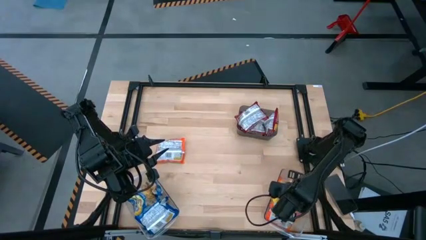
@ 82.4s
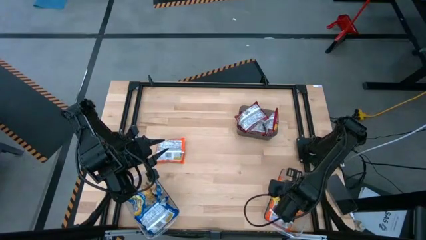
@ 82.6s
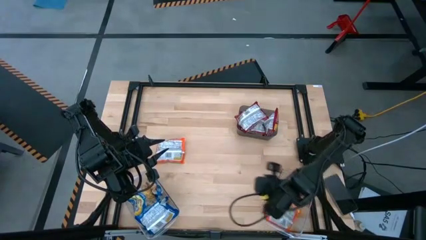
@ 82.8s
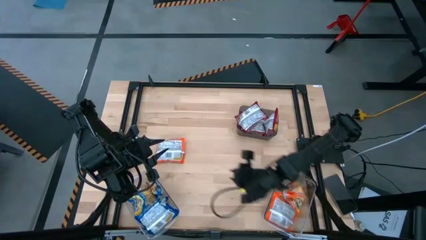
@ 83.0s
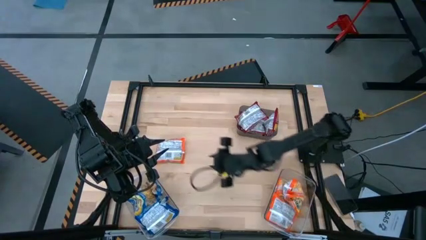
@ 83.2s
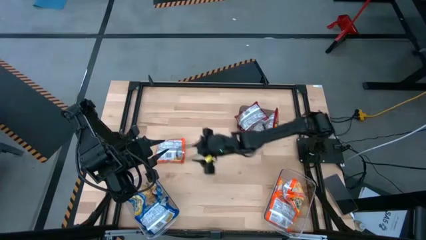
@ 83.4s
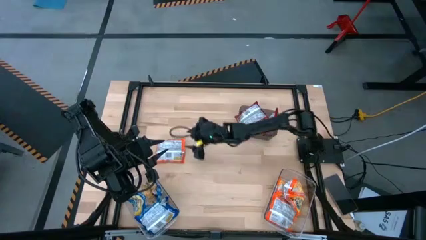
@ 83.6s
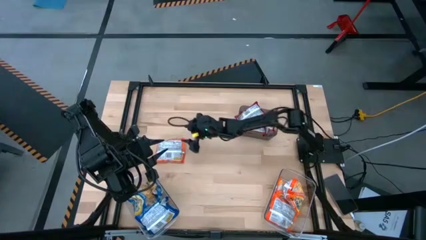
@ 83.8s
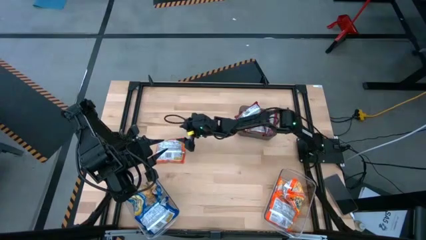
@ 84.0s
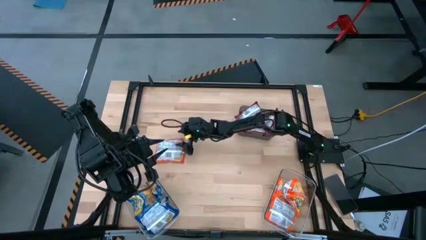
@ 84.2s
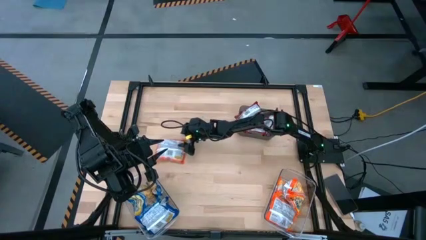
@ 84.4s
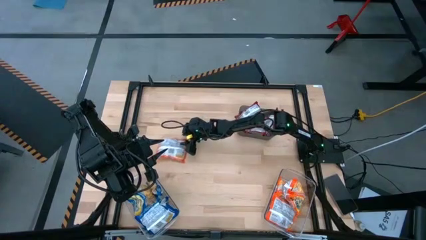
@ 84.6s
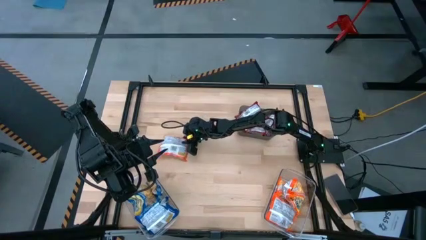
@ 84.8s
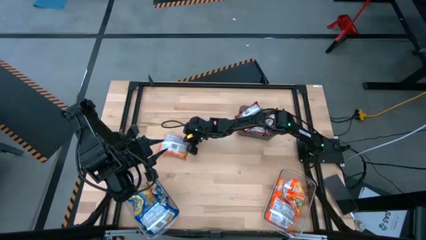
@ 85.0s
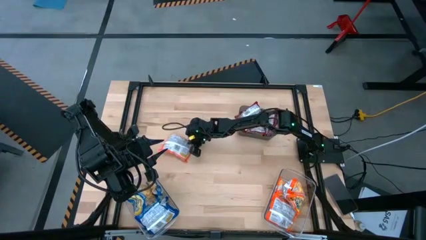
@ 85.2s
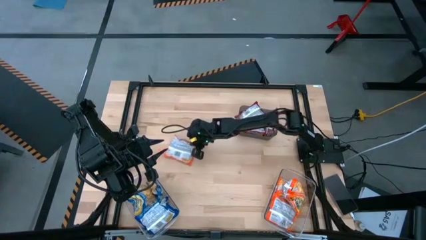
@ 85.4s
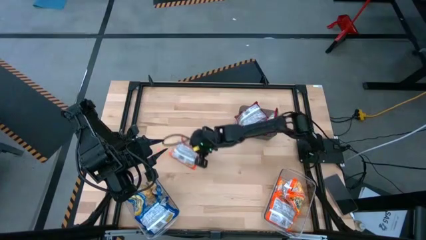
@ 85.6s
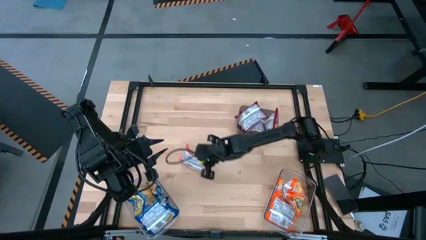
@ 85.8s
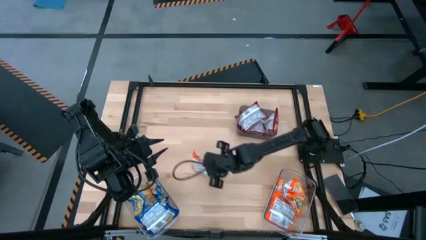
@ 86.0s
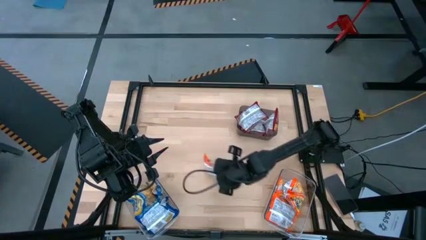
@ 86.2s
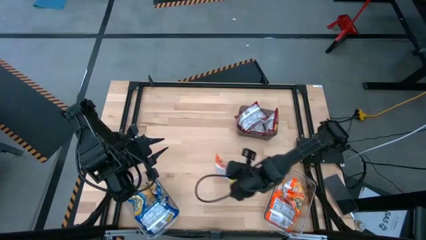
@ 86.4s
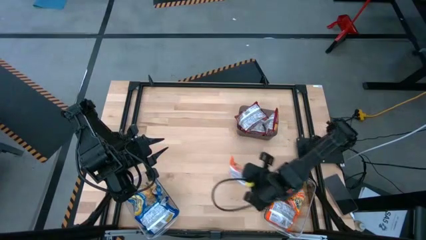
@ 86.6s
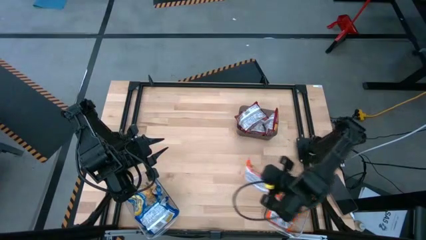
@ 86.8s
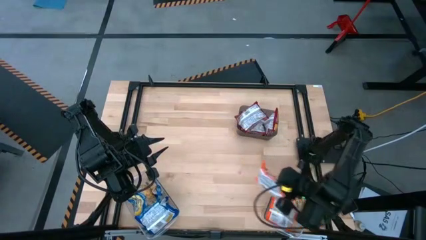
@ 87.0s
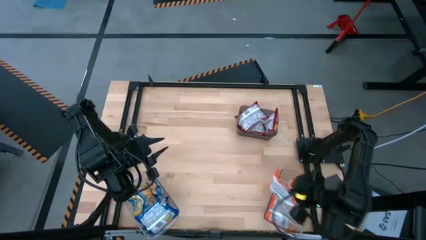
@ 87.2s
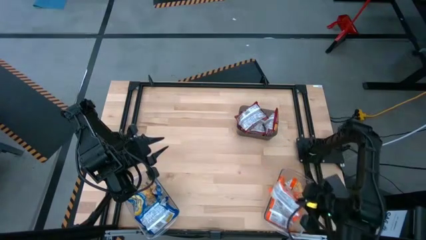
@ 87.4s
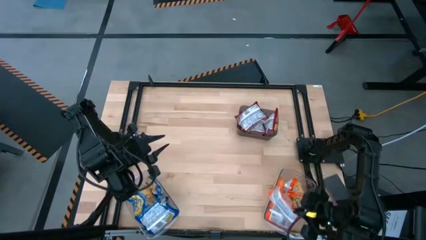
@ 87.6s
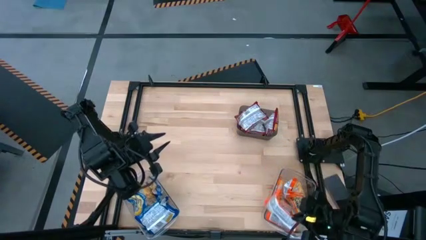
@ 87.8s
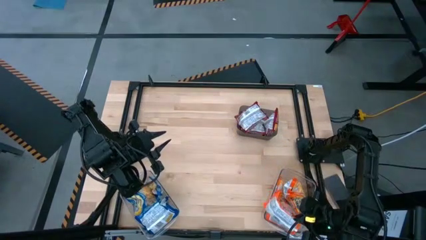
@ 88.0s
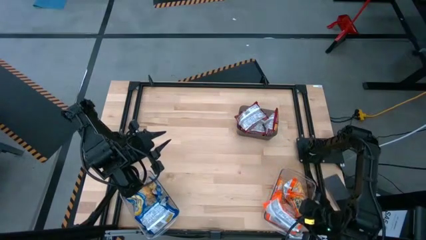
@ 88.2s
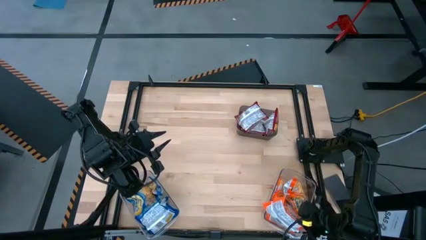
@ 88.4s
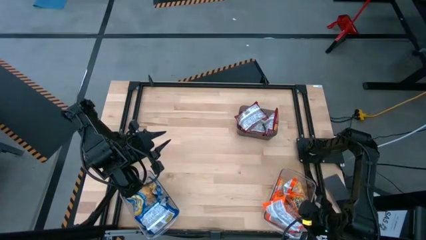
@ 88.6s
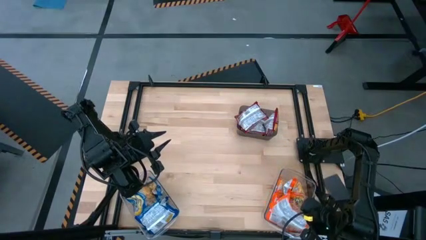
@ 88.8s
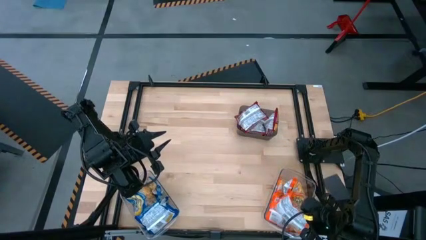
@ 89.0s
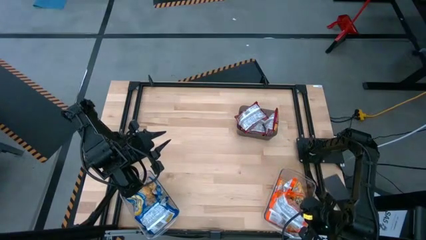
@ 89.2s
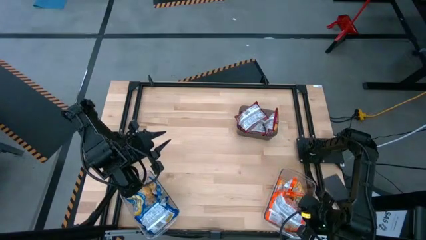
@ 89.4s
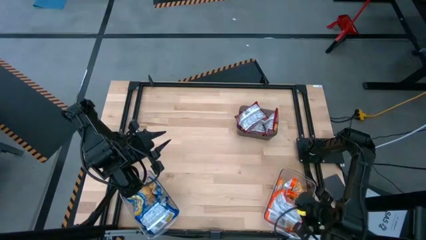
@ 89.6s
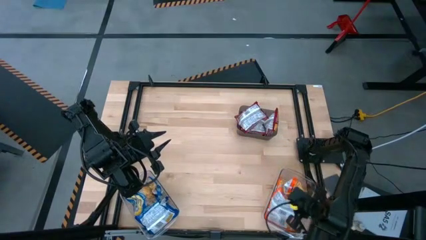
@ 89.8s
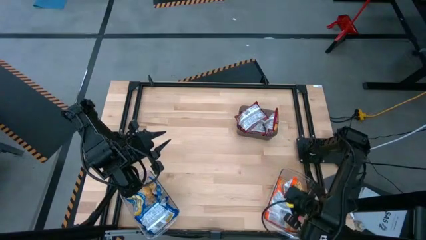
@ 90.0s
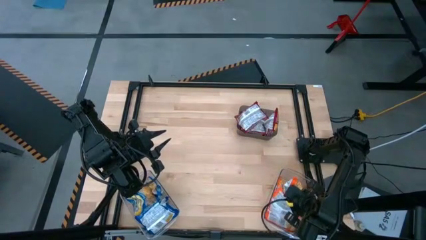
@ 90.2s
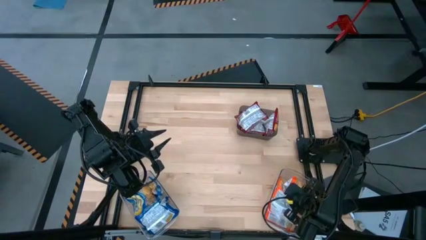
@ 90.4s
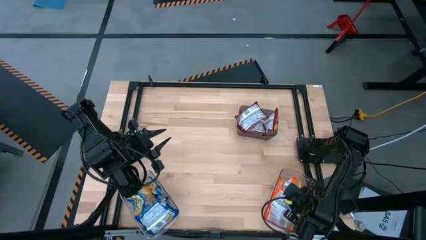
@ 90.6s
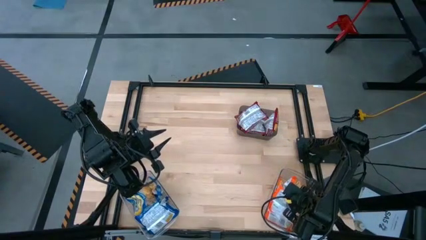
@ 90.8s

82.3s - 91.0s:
Task: Sort Maruchan noodles
Put the orange noodle pack into the right transparent bin

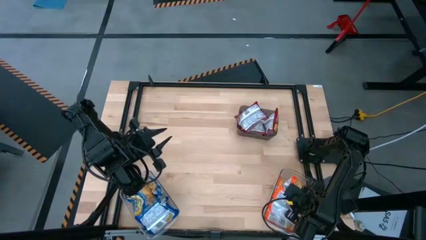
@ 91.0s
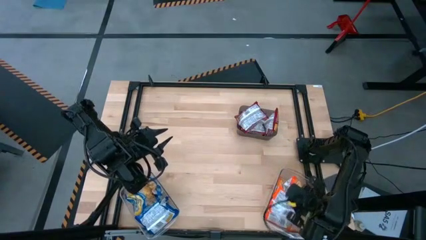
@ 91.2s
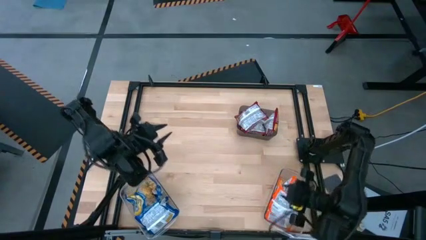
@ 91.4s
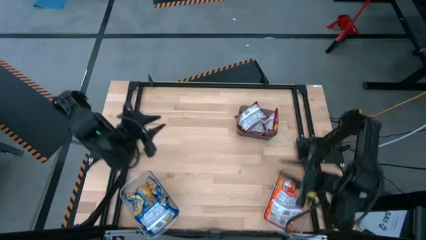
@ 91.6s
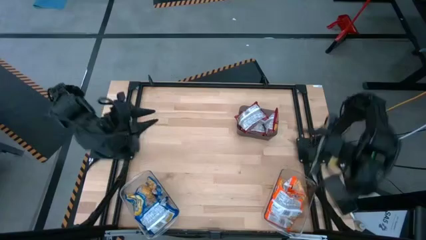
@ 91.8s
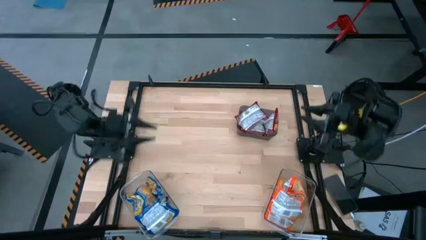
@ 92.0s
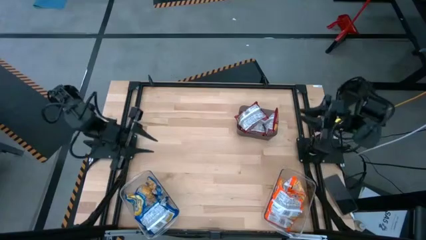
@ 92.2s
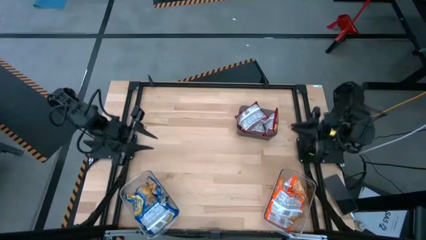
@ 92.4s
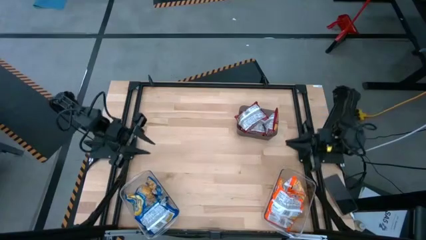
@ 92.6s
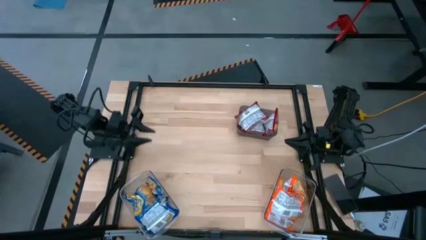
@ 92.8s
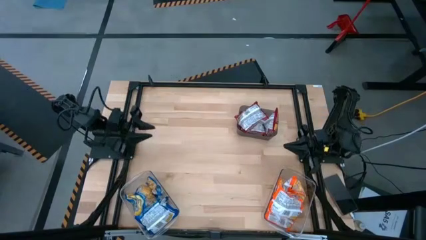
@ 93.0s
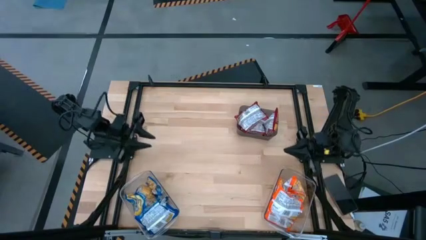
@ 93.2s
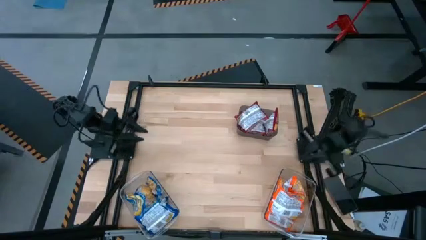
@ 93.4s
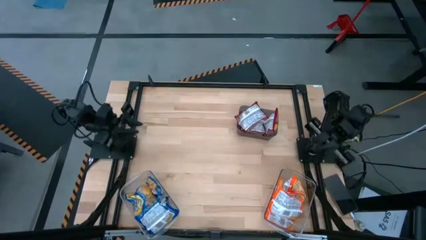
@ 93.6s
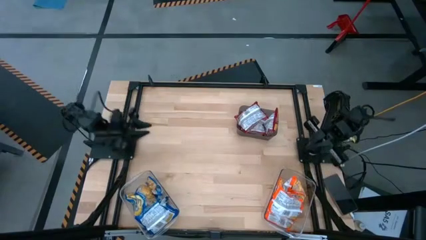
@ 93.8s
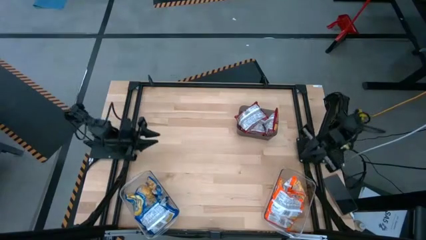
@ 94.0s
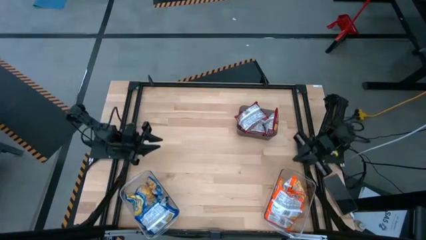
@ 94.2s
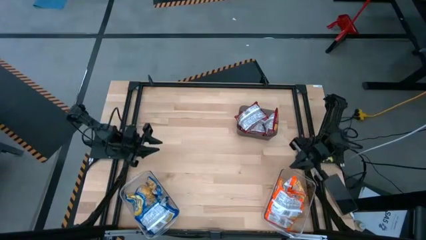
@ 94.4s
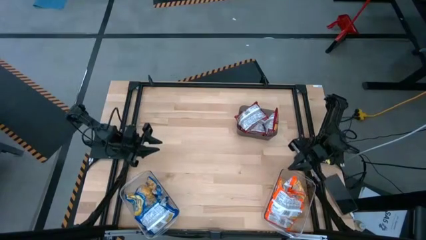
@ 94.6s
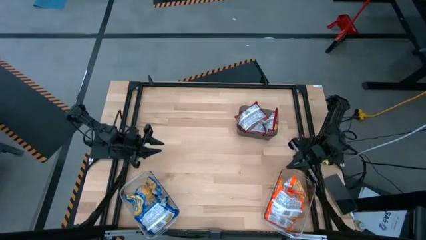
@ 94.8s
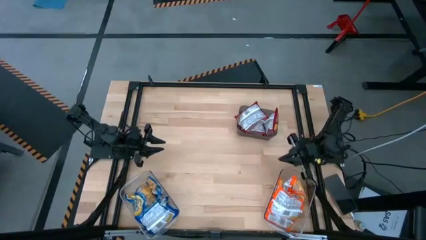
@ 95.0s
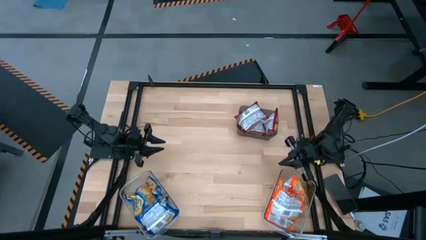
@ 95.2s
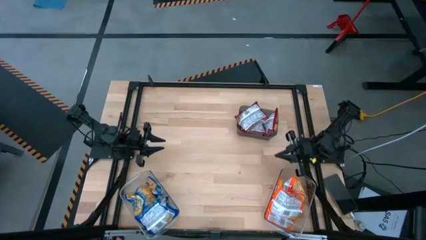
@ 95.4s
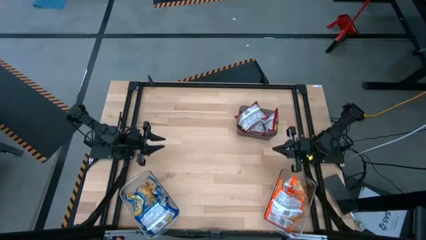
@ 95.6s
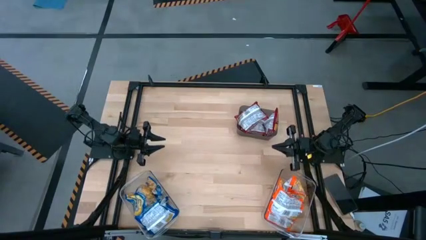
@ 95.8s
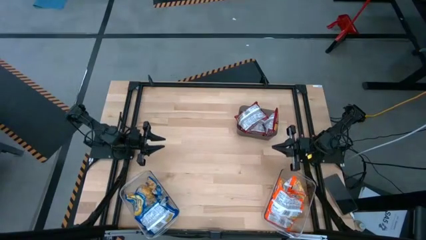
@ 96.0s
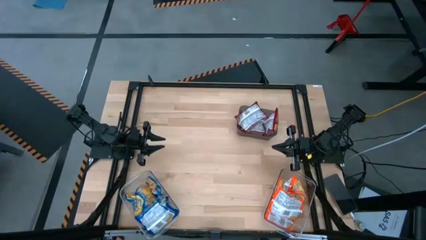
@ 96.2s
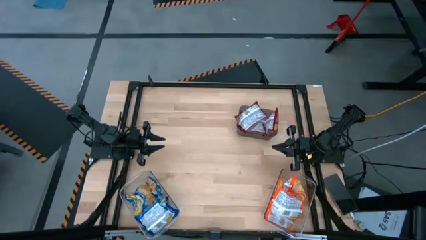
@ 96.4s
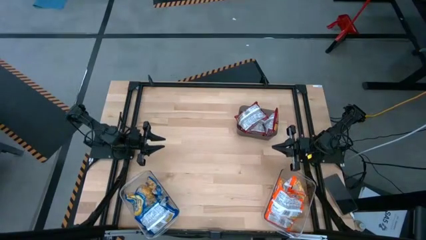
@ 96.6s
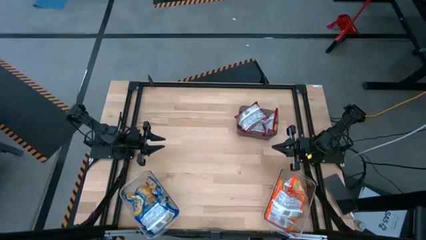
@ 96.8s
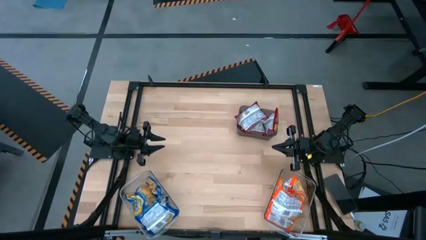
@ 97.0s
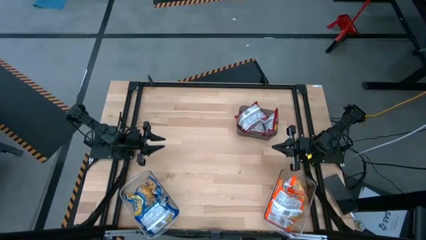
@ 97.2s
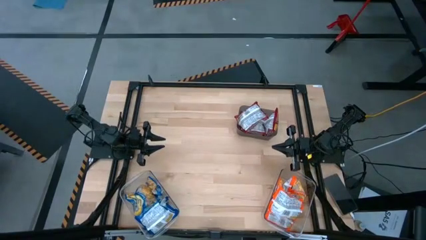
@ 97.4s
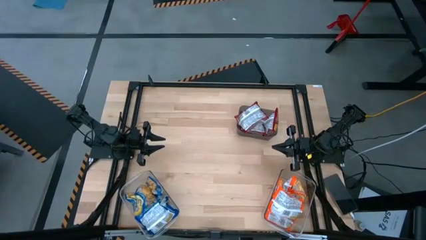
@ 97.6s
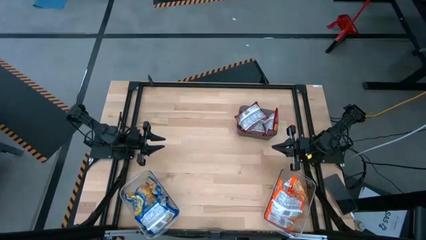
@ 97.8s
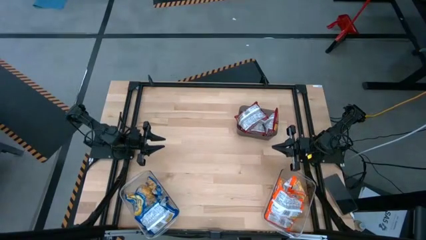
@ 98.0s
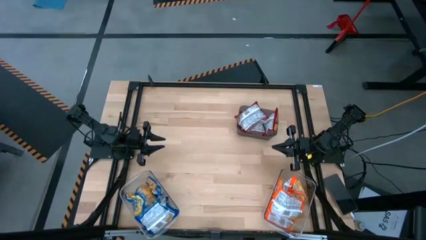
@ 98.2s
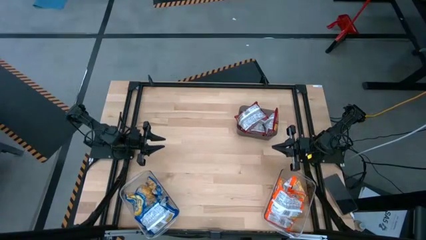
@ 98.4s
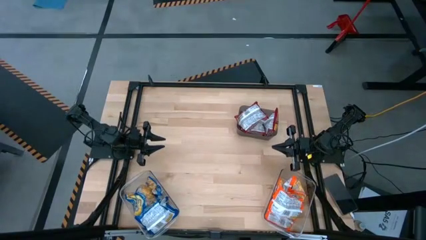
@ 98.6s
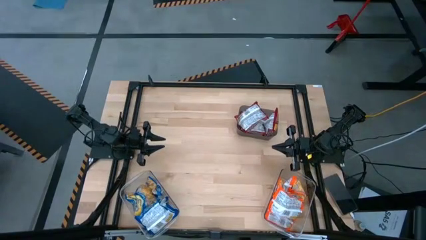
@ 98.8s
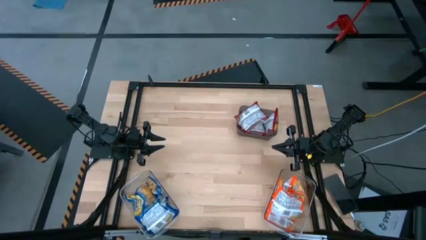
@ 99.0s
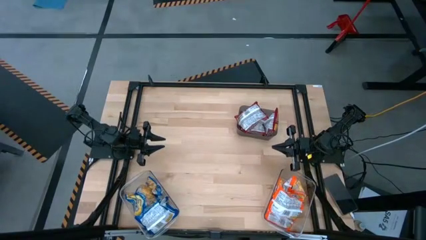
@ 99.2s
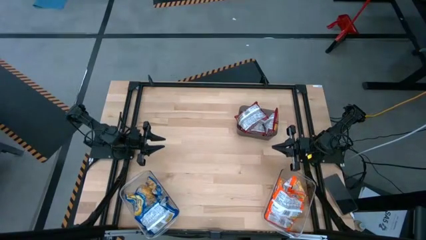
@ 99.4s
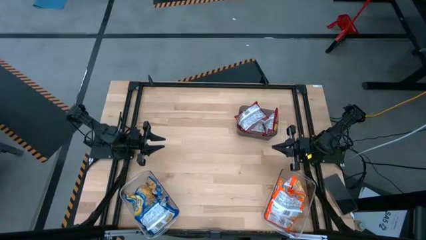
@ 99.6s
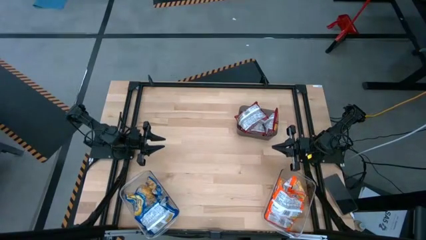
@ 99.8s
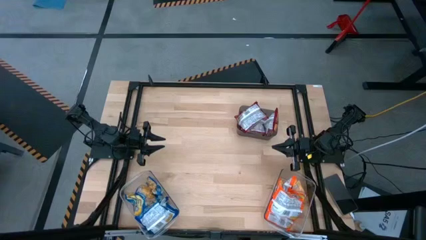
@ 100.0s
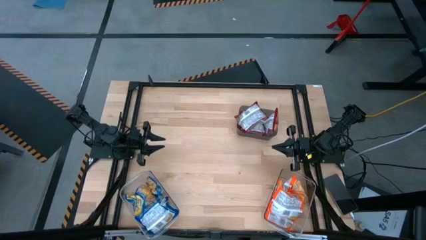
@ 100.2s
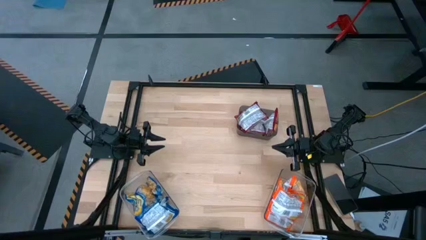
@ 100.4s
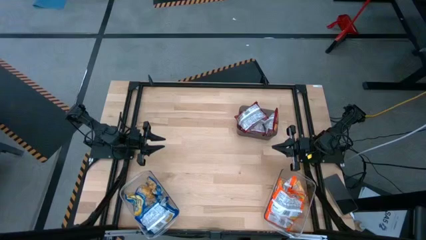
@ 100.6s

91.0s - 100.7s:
Return to Home Position
